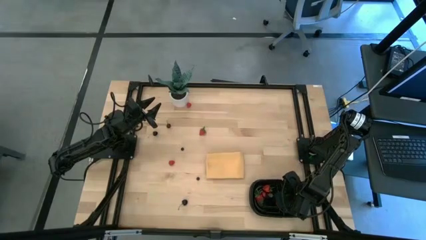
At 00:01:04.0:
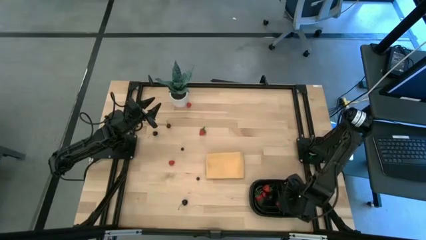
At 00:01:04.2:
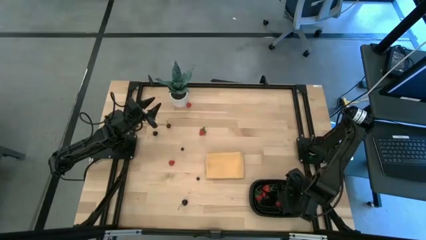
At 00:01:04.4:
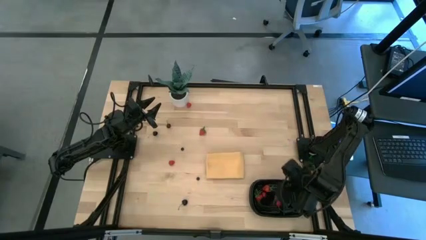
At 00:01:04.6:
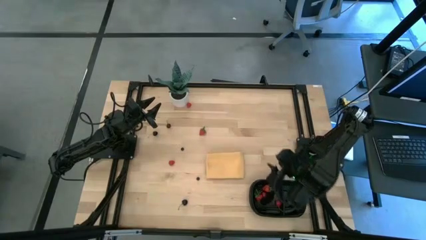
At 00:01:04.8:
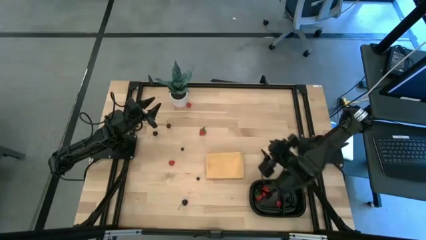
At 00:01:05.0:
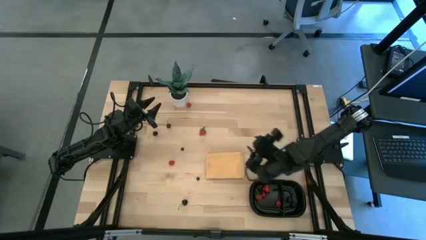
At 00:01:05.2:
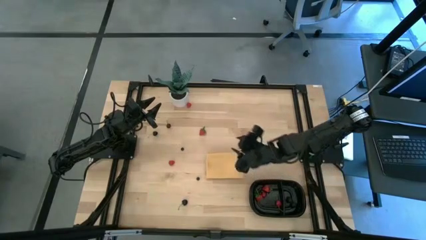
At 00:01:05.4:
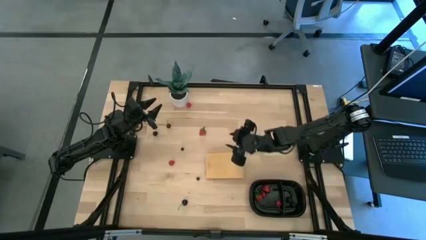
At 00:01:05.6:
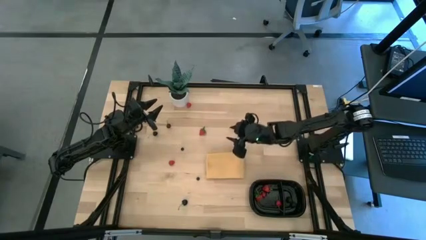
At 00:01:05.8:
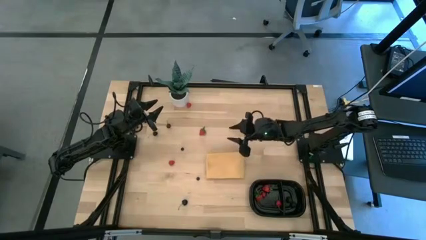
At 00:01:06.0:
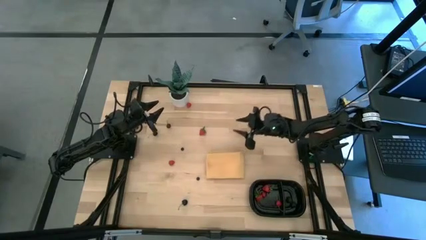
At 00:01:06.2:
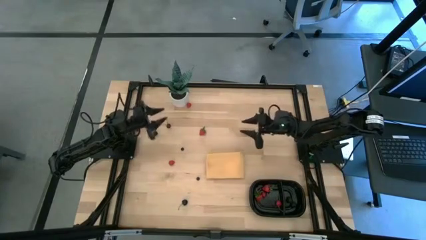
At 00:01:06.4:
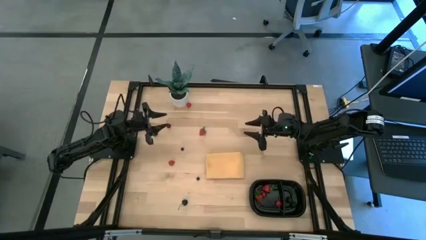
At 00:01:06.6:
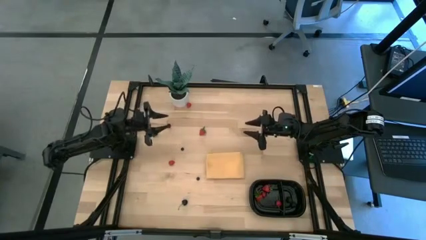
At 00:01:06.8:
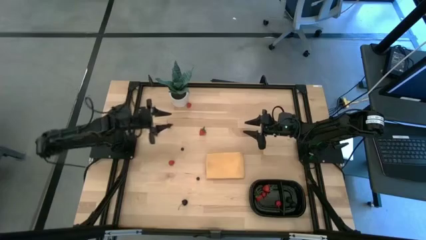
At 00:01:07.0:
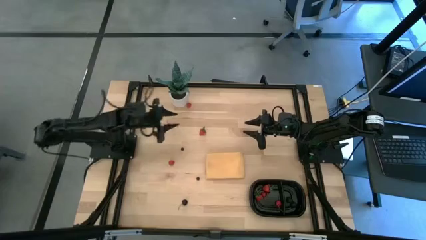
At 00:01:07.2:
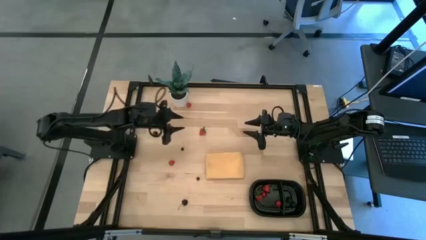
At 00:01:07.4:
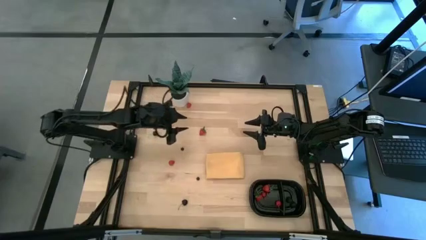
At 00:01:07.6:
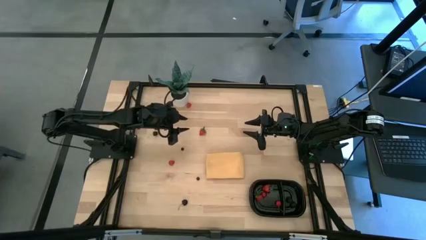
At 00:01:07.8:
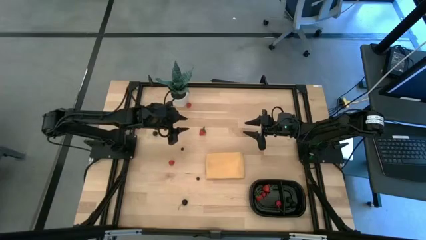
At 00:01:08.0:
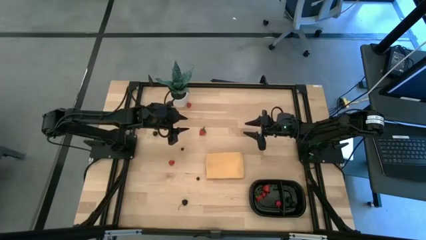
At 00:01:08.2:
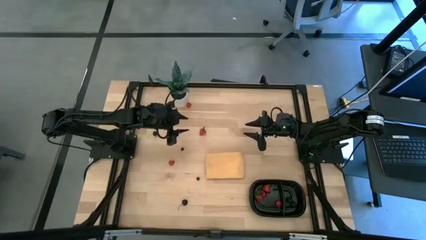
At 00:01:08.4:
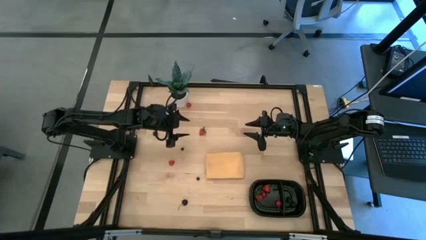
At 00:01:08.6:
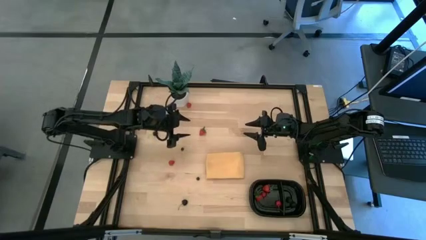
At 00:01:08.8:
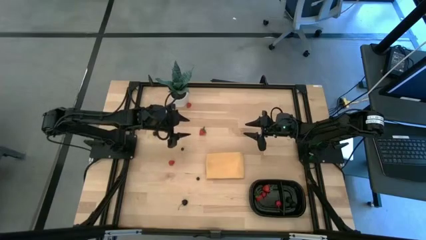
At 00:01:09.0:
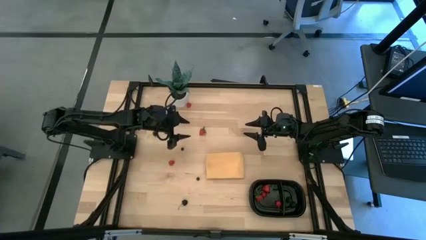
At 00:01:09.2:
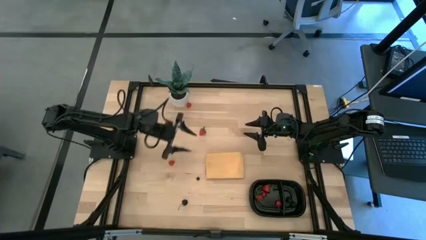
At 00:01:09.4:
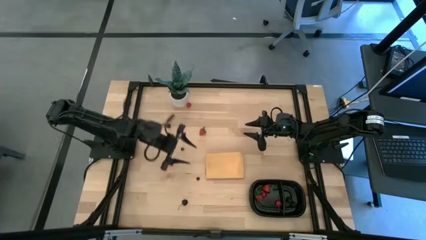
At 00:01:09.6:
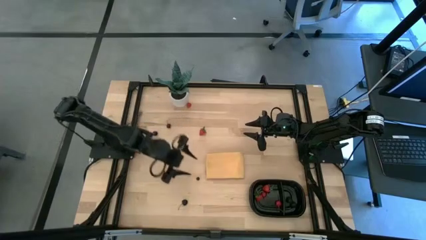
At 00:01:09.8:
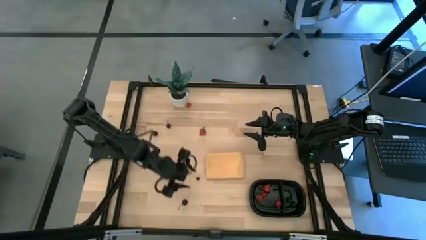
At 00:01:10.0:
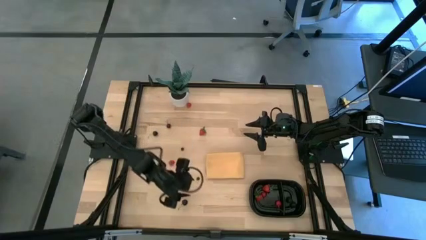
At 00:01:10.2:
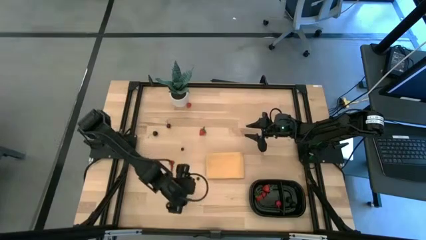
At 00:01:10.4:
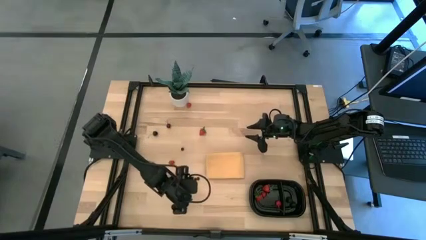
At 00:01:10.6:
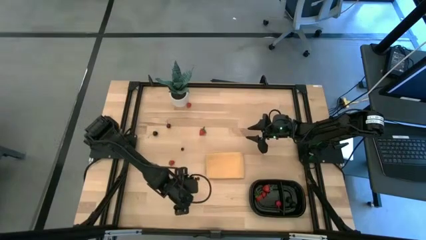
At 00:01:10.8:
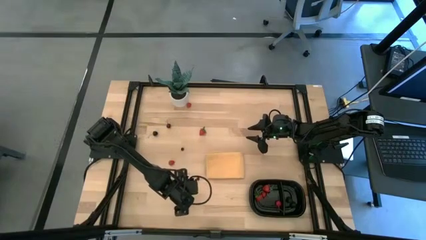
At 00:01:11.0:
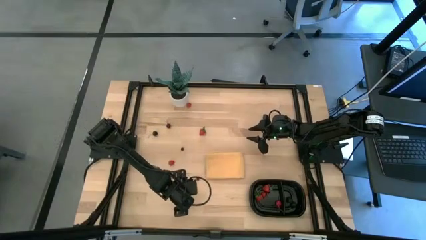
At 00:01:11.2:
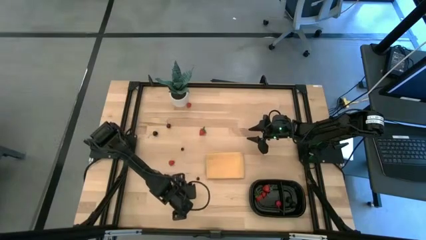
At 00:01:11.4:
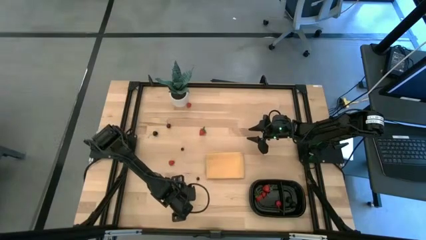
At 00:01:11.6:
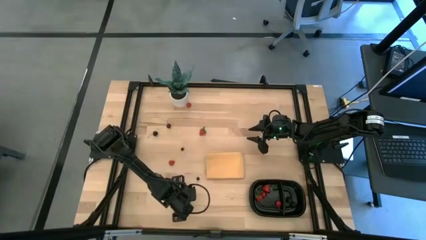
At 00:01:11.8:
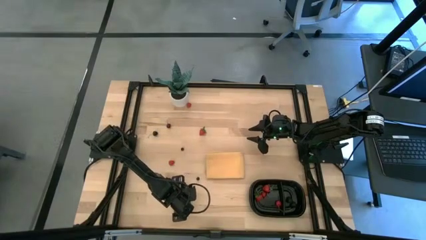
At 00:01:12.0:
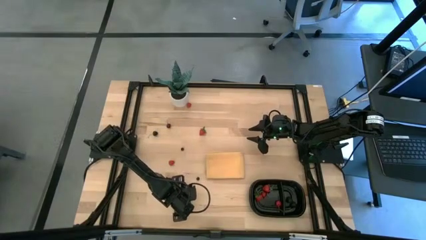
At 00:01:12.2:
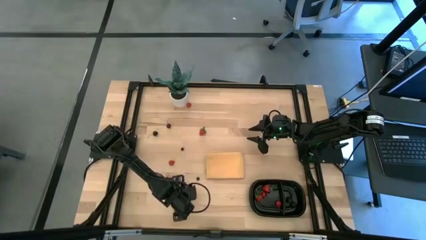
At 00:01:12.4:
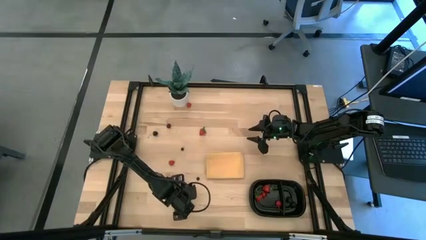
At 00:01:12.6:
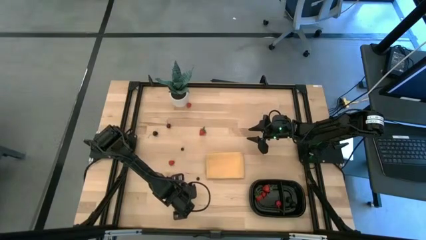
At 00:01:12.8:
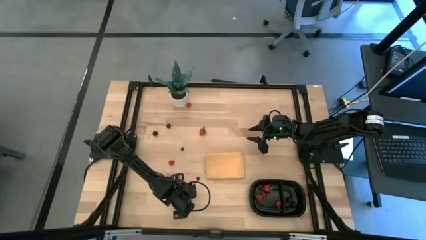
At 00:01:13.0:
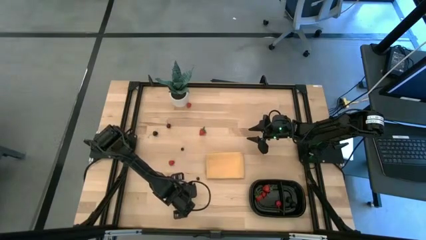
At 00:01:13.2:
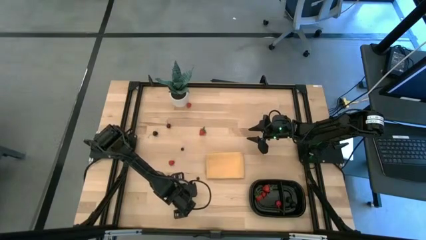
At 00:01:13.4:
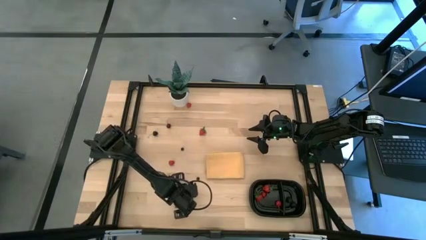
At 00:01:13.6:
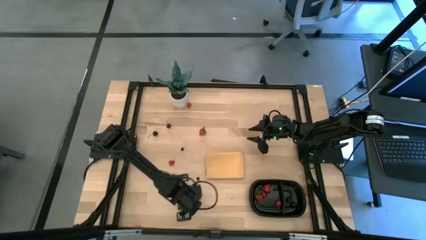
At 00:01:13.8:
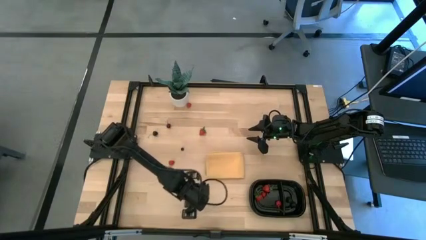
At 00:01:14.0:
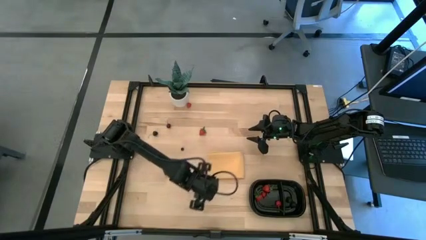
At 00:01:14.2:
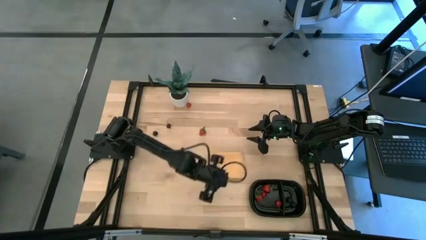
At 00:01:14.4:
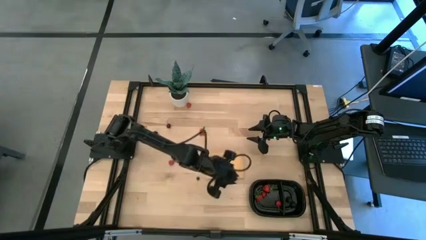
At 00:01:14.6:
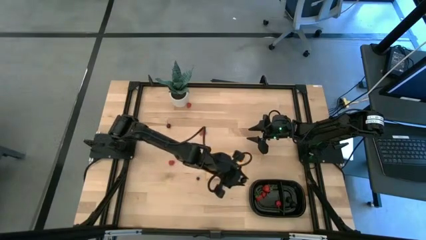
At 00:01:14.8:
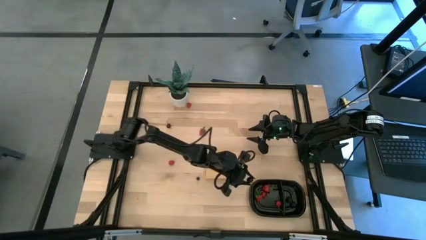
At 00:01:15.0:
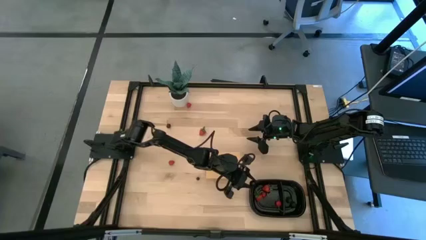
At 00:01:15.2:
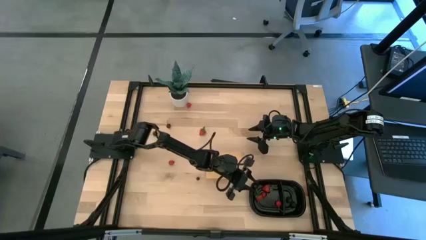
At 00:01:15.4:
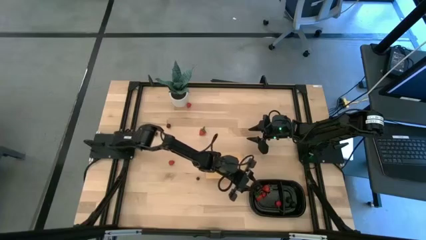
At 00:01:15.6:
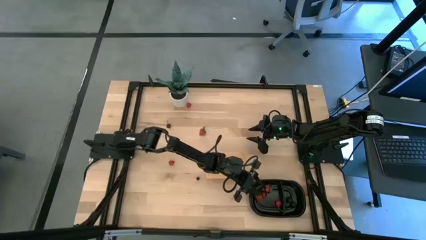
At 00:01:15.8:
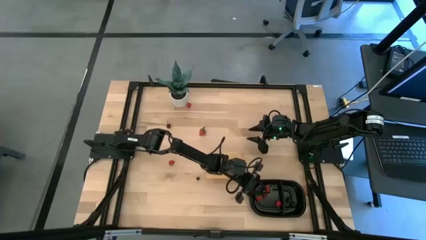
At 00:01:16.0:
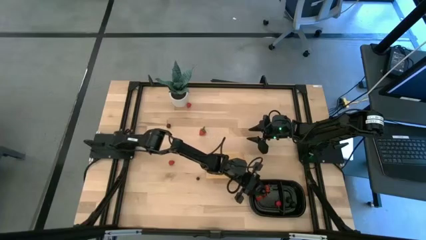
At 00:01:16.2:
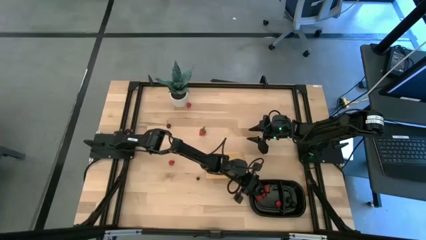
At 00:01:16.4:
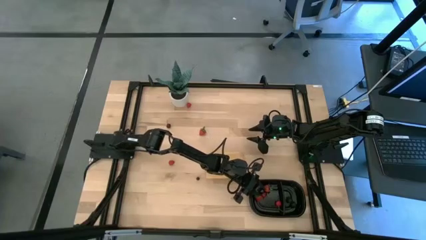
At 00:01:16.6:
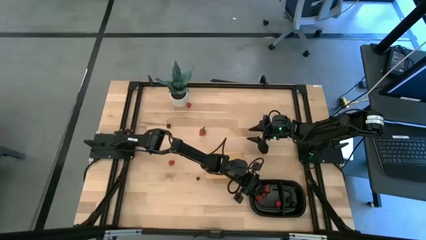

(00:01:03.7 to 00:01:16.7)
Task: Pick and placing Produce into tupperware
Put the bottom black cherry into the black container
